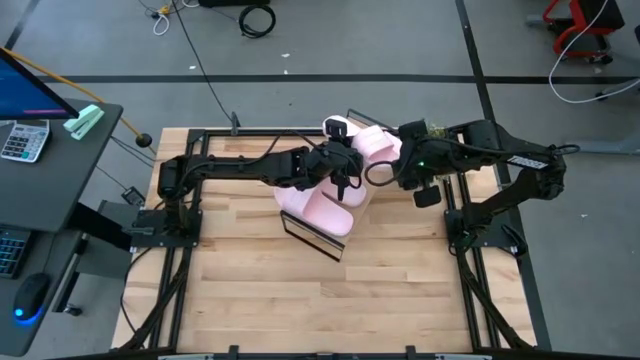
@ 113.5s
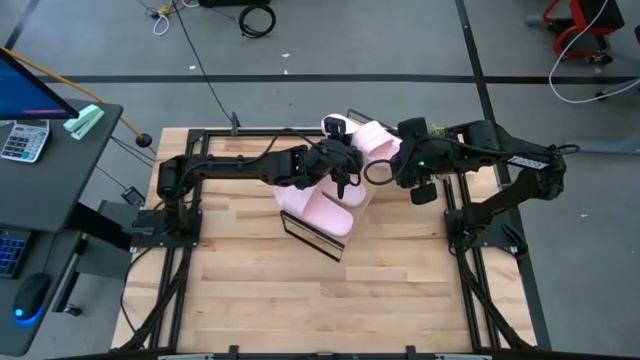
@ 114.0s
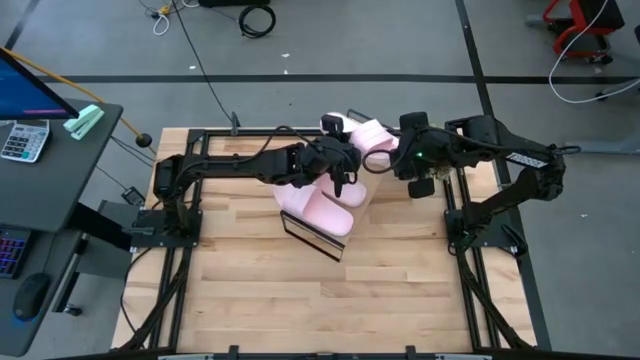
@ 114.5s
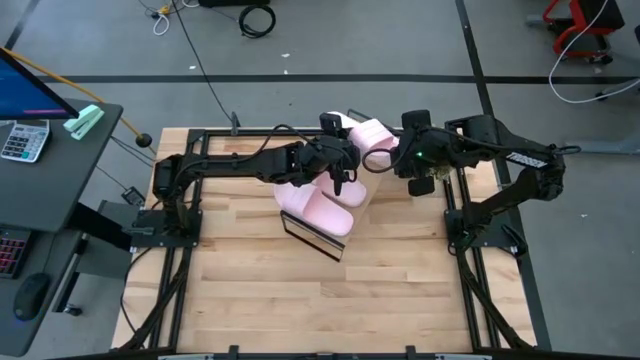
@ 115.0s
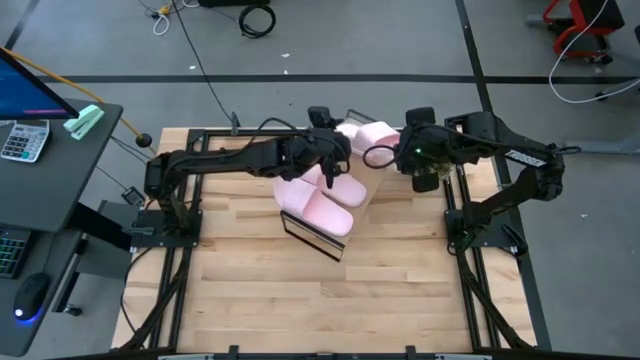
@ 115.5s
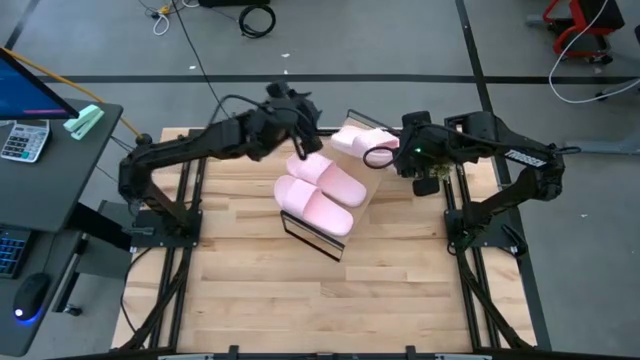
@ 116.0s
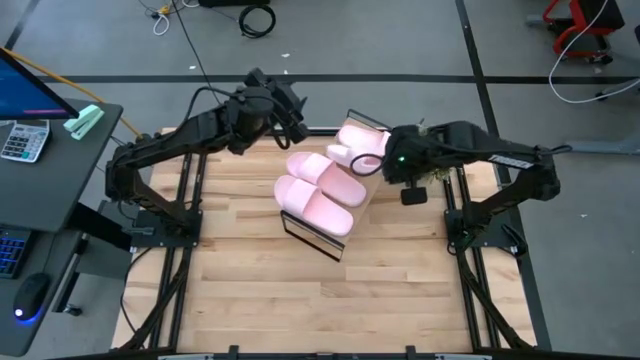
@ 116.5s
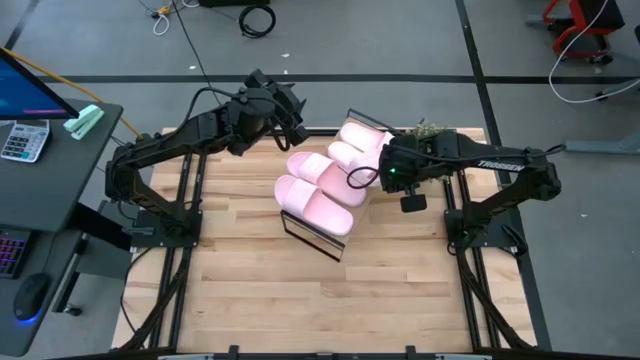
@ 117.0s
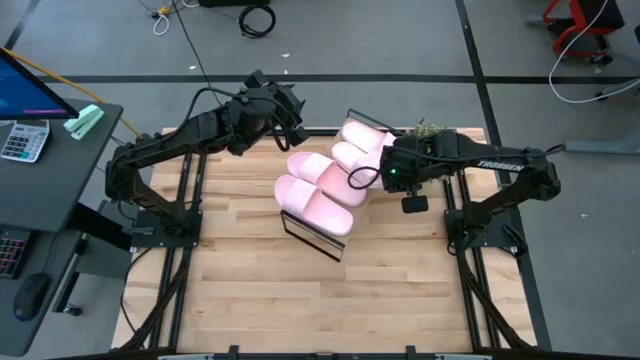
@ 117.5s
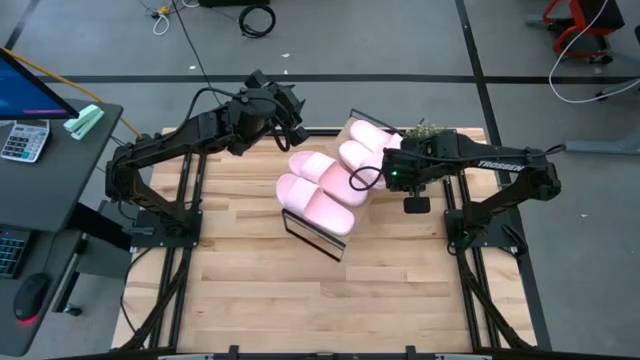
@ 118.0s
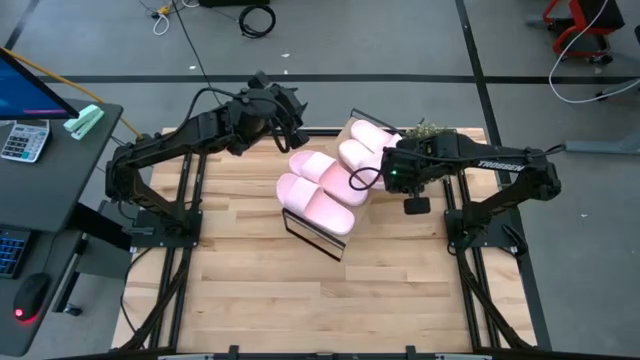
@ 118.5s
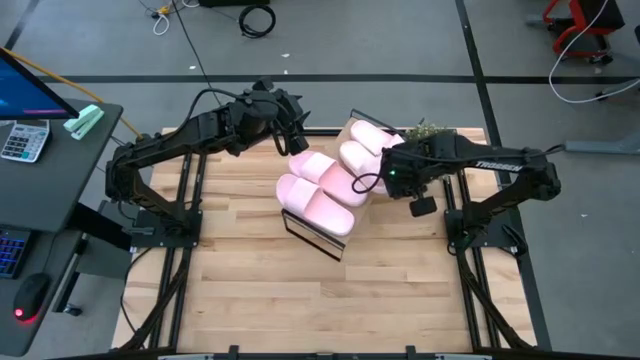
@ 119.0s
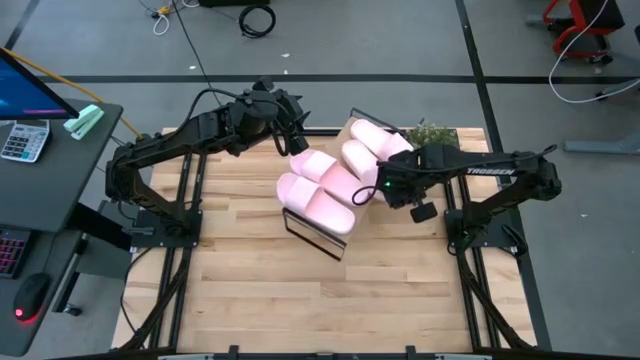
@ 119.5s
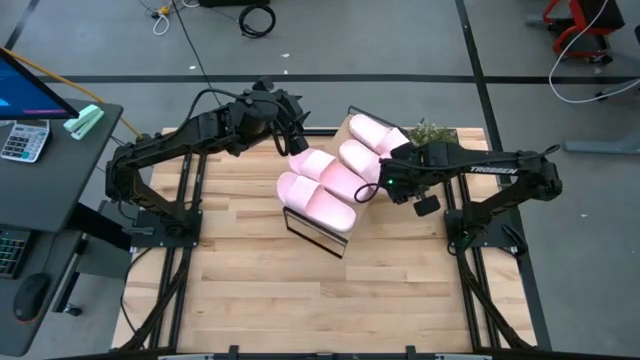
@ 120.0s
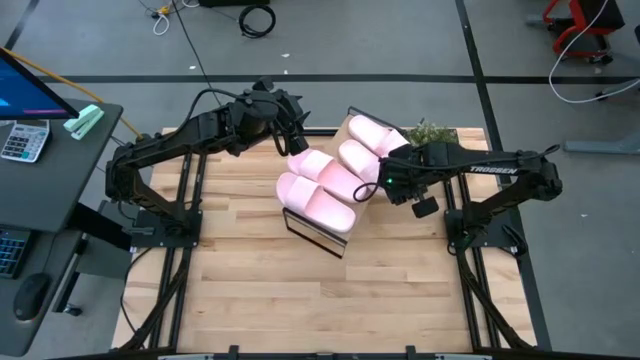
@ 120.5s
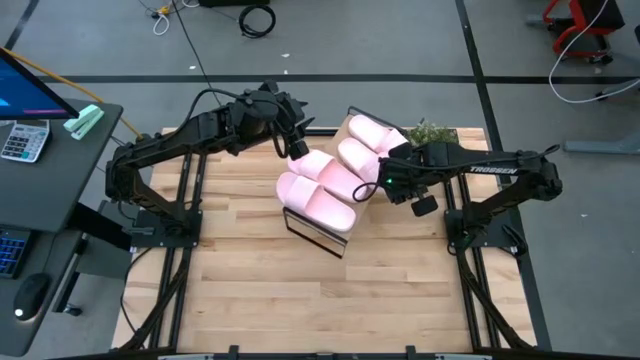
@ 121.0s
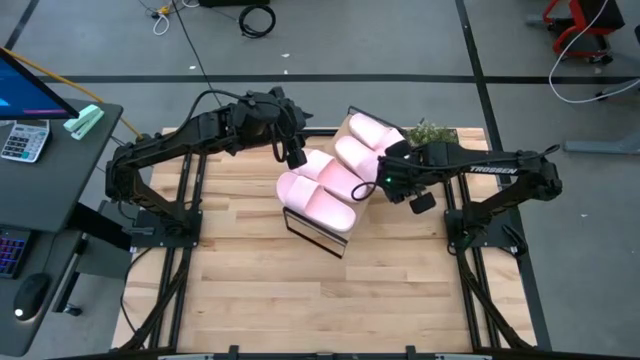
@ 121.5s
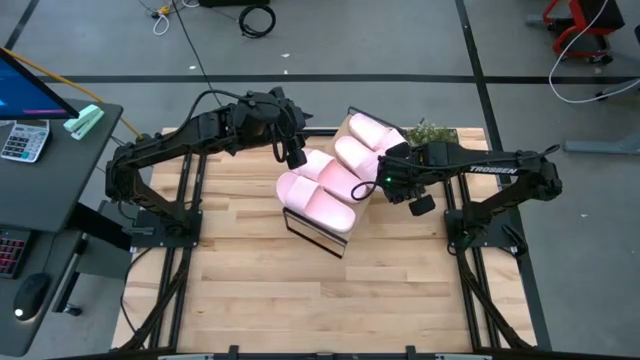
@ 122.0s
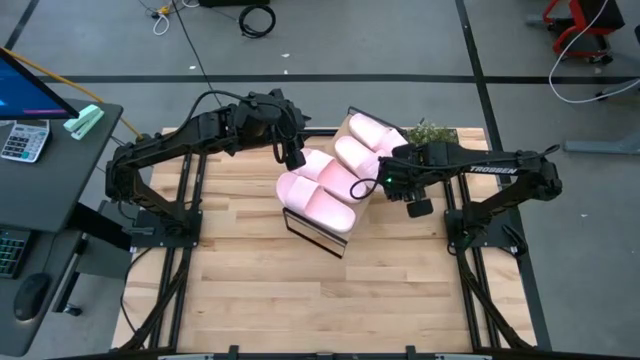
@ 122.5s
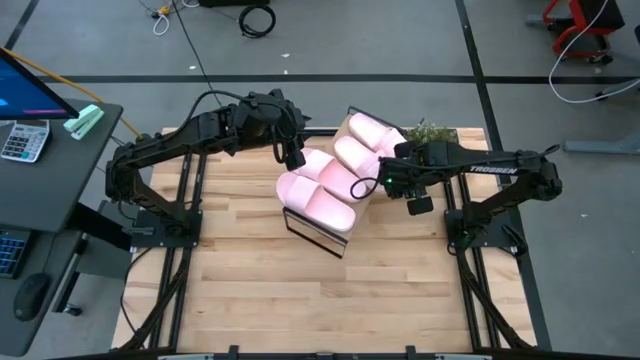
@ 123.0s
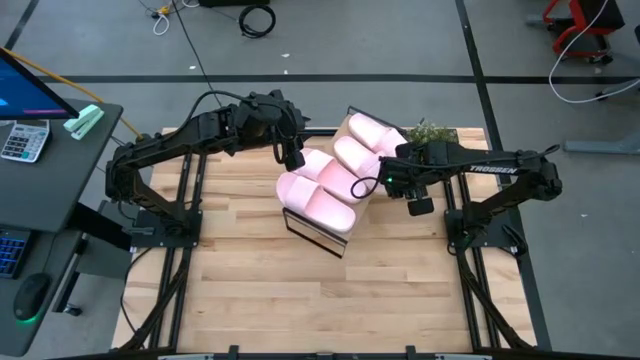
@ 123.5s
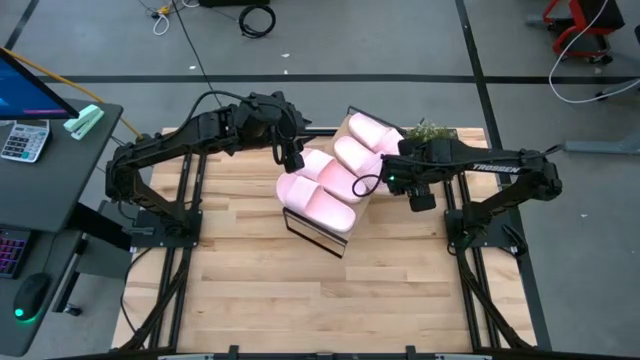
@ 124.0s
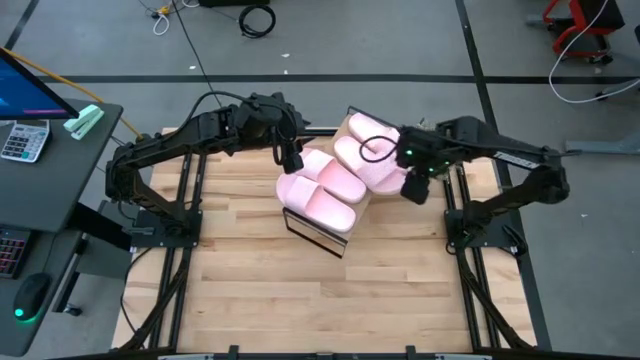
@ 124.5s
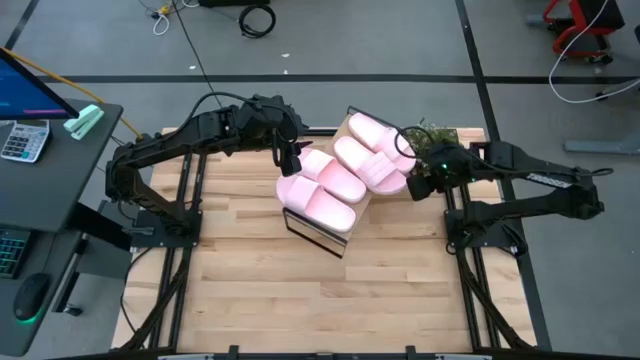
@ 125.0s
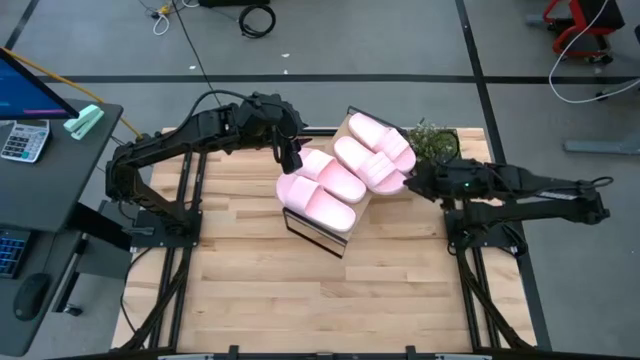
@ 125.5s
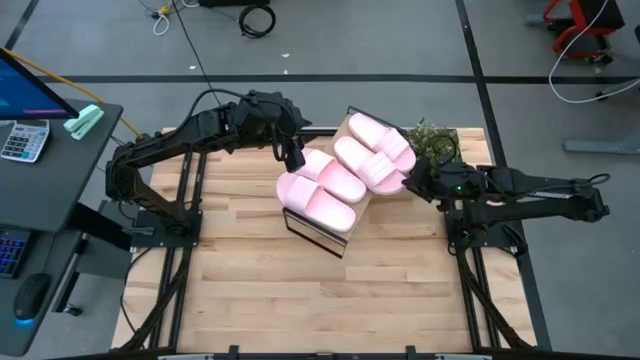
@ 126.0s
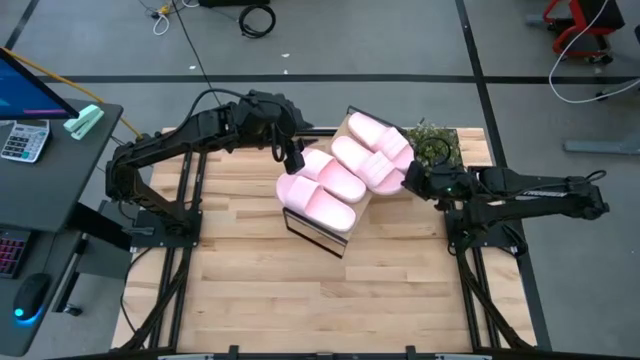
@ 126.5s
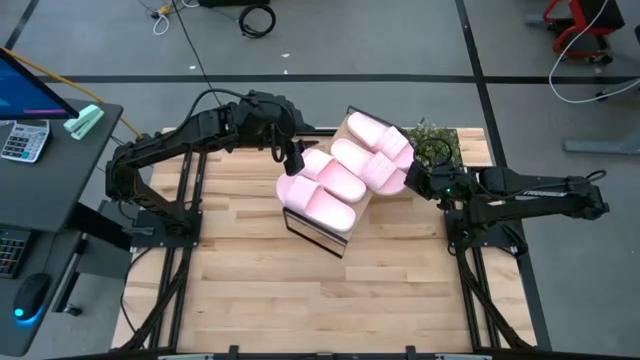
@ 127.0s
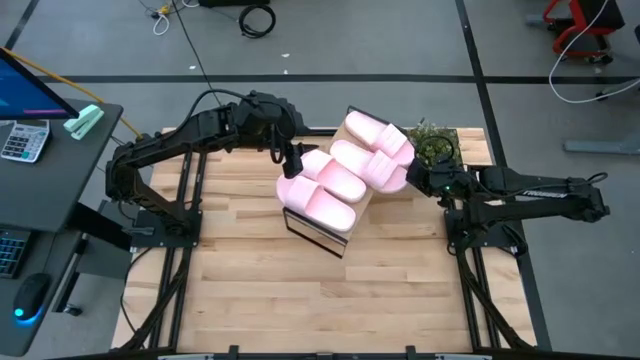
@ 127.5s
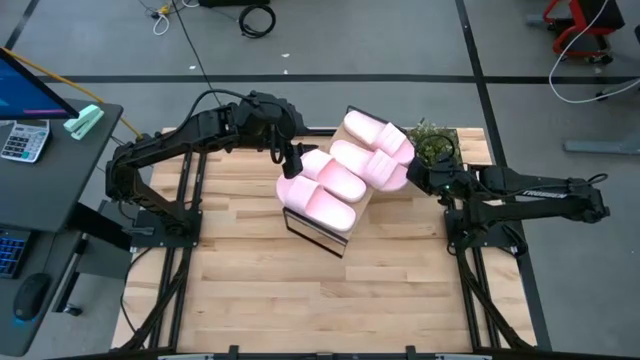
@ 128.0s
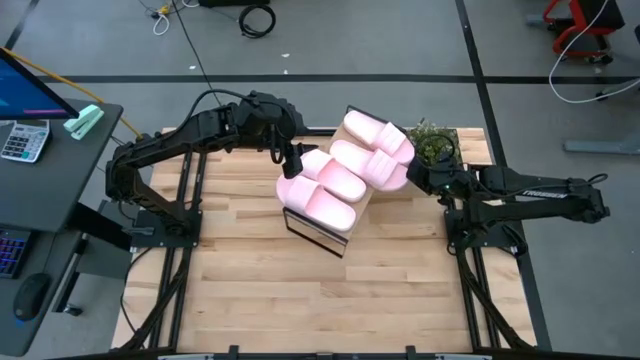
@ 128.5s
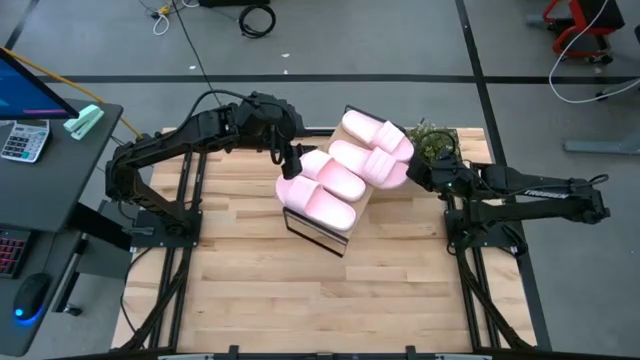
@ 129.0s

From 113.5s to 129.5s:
Task: Pick and place slides into the shelf
Put the pink slide on the shelf

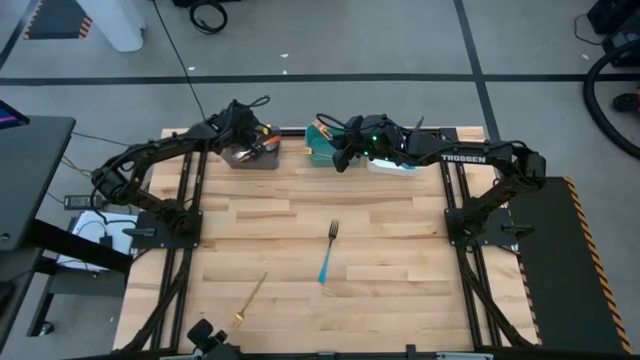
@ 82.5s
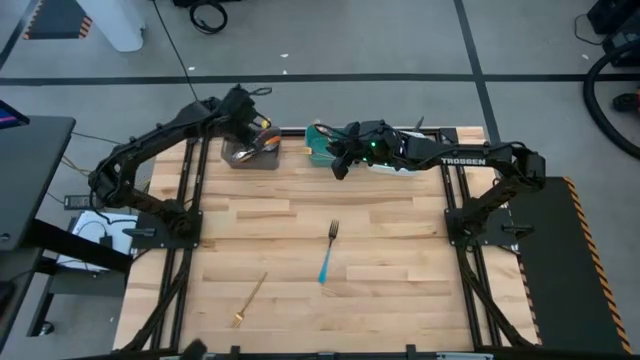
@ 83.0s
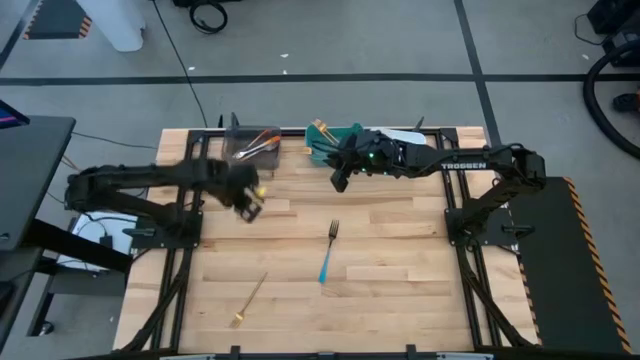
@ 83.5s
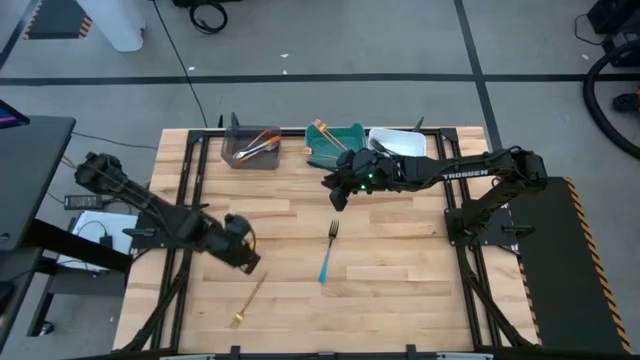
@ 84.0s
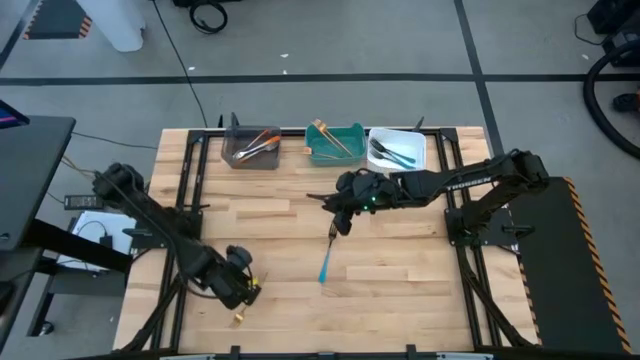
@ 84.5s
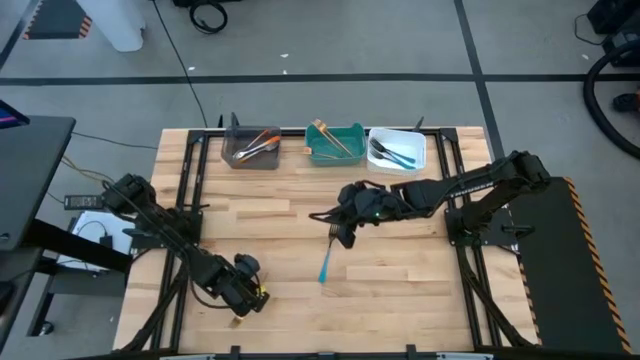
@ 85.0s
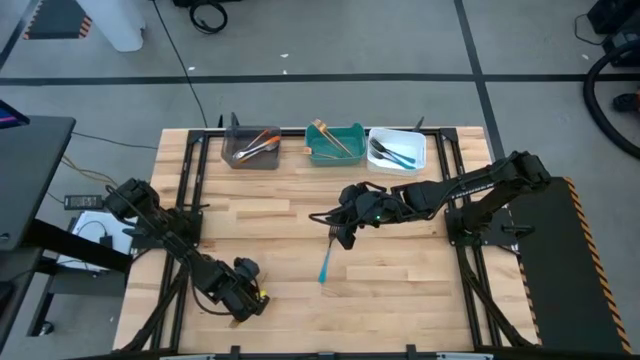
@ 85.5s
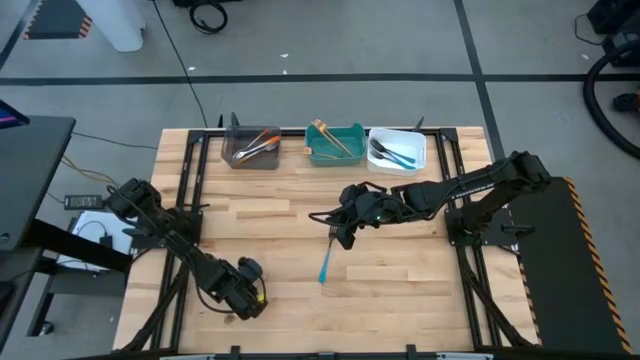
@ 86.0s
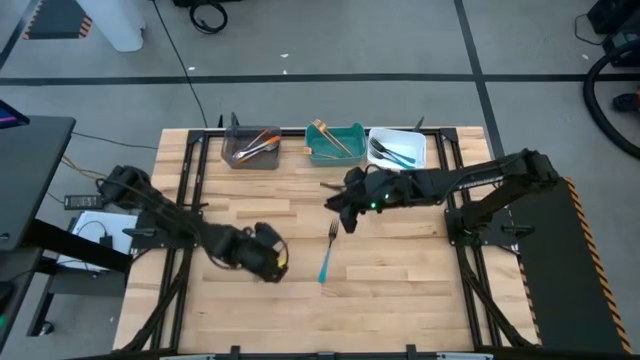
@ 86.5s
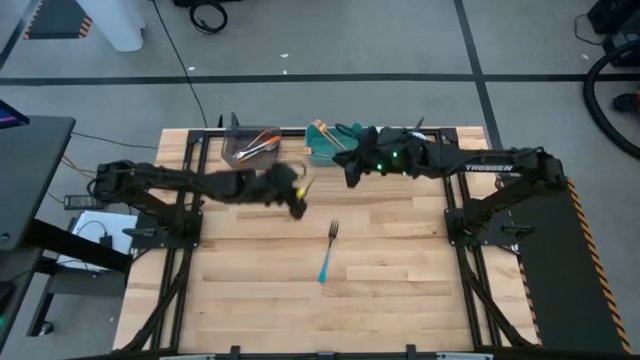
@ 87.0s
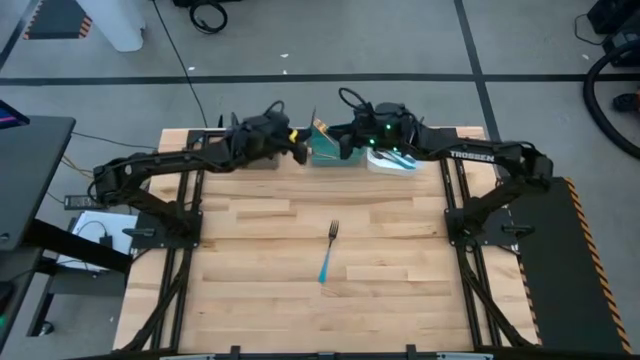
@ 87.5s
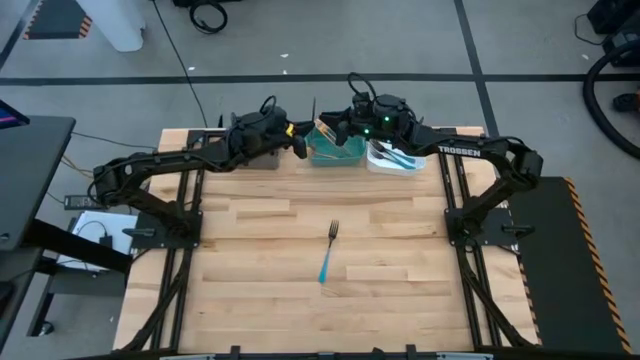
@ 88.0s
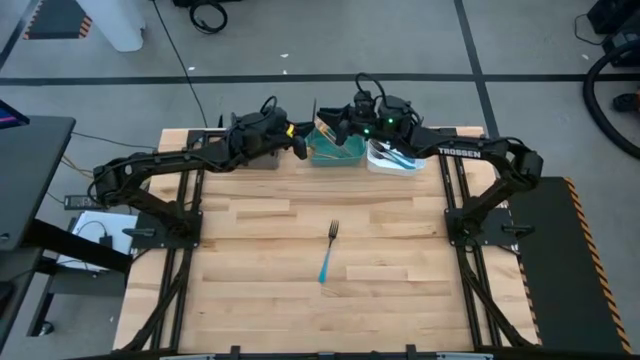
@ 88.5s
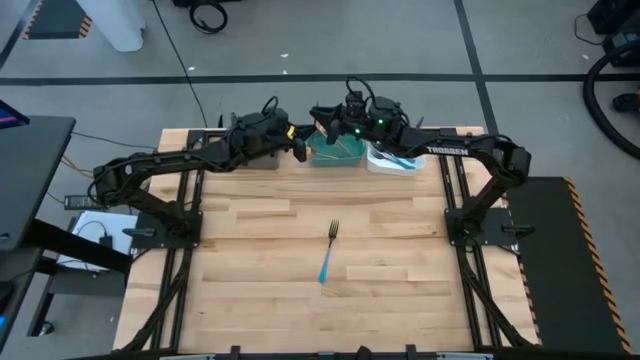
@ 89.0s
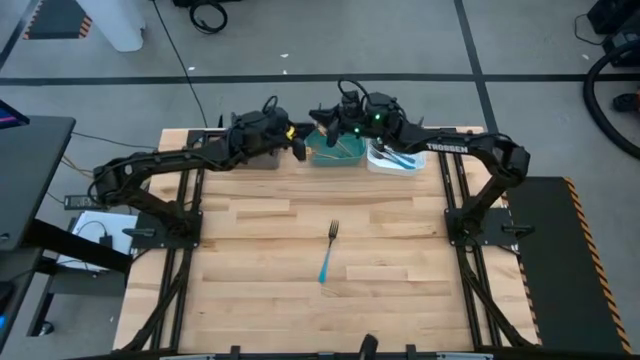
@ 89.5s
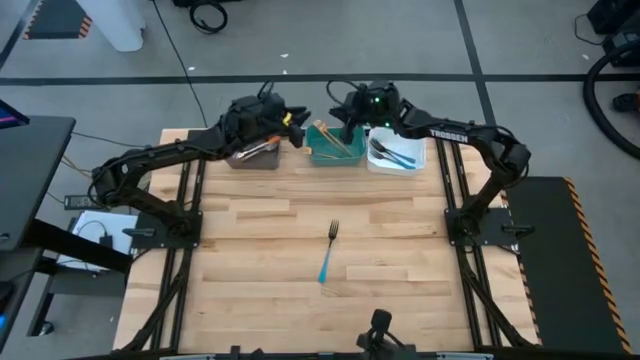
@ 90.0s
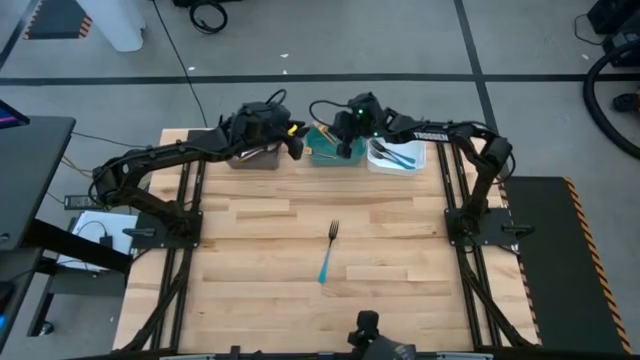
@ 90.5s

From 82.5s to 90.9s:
Task: Sort silverware by color (type)
Put the gold fork into the green bin
